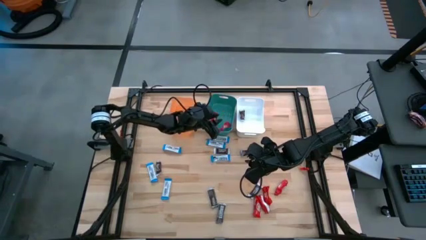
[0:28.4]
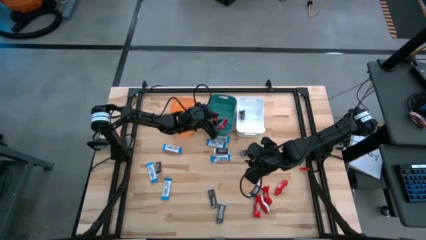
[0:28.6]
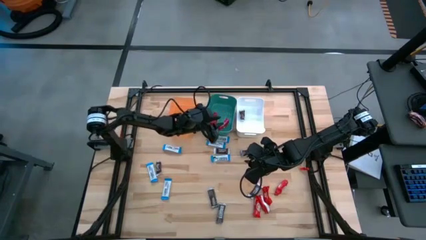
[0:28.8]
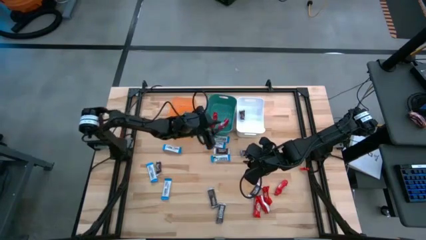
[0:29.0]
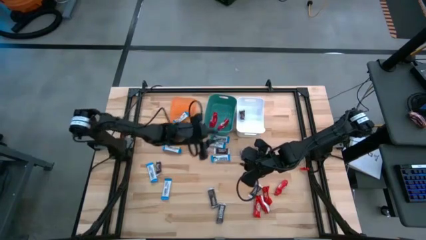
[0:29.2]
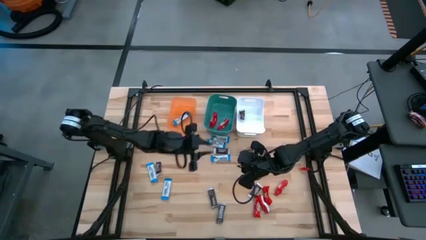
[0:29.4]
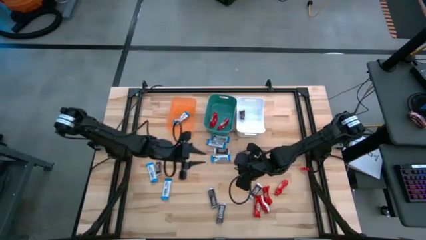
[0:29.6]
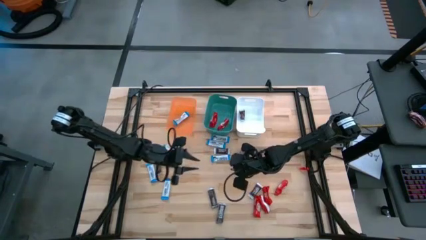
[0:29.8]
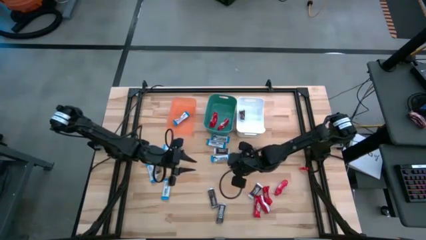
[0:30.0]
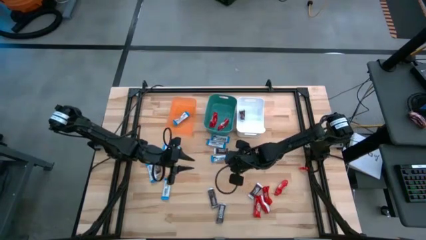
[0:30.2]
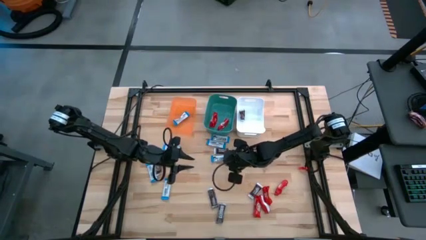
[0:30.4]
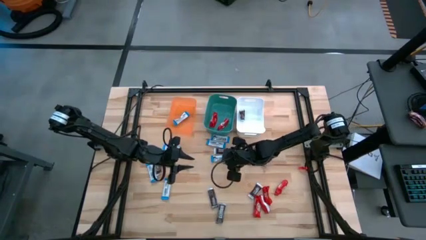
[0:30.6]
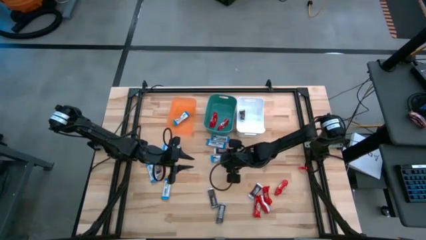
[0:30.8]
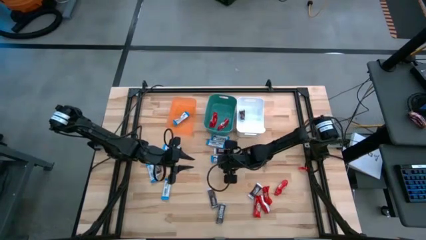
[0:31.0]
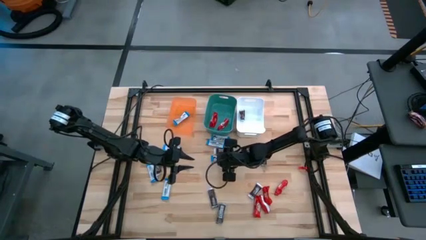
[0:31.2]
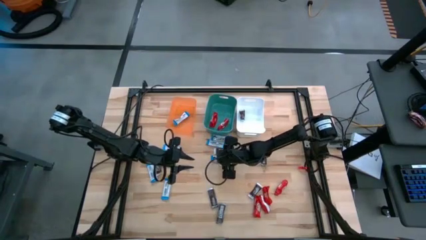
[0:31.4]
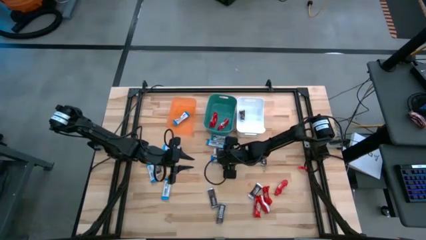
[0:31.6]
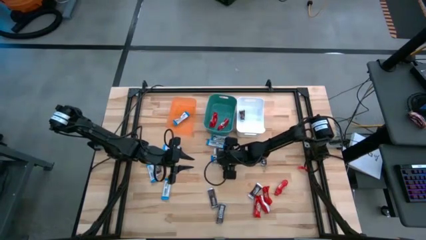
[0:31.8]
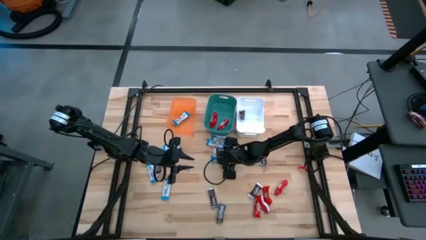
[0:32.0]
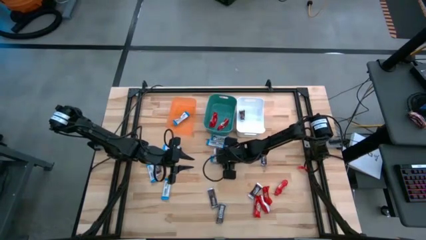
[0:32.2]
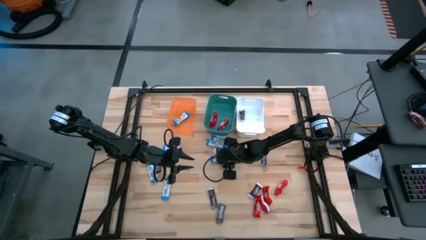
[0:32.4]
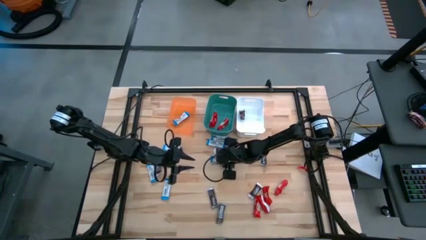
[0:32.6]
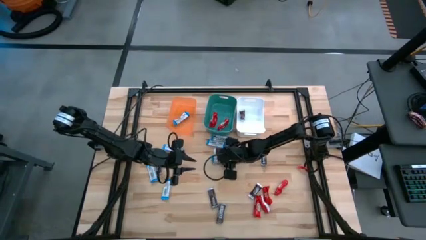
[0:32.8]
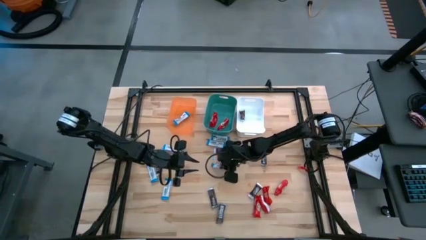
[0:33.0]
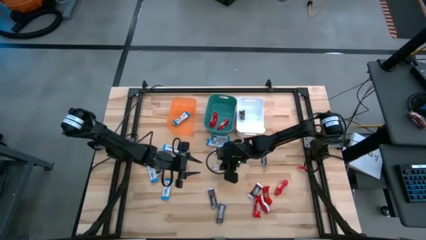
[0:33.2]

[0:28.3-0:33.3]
Task: Organize candy in baskets
Put the white chocolate into the orange bin

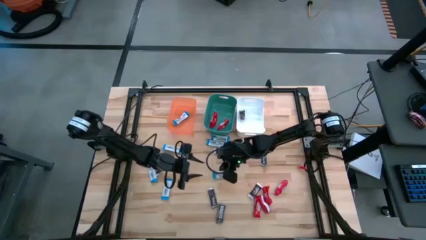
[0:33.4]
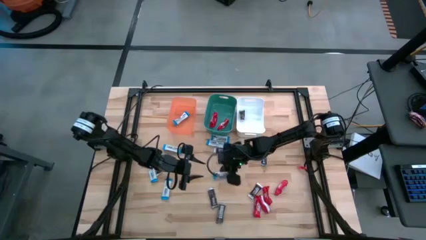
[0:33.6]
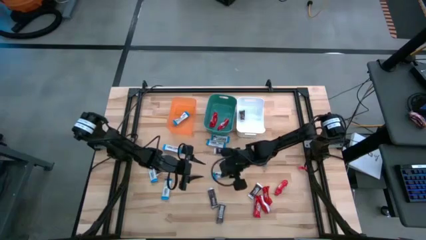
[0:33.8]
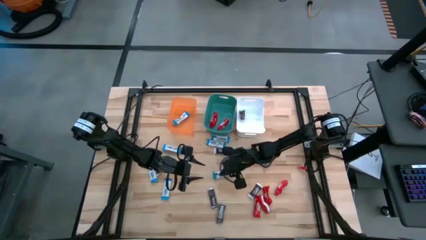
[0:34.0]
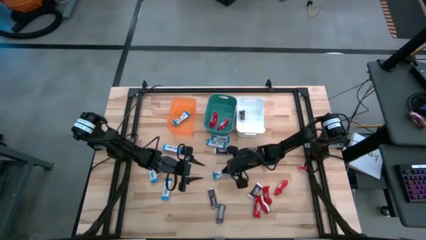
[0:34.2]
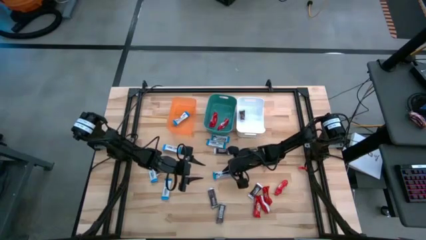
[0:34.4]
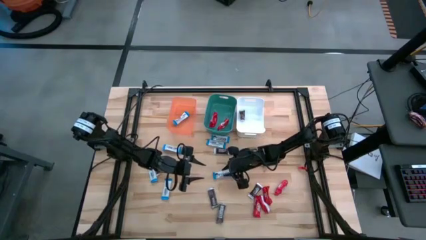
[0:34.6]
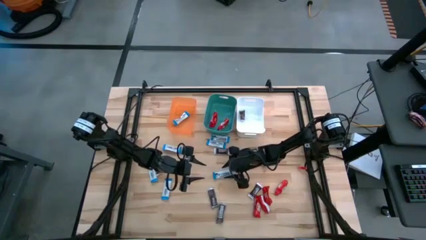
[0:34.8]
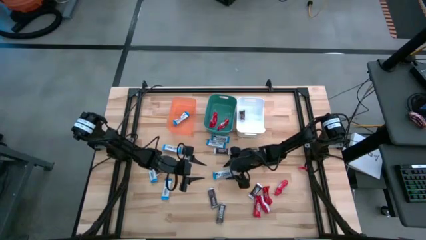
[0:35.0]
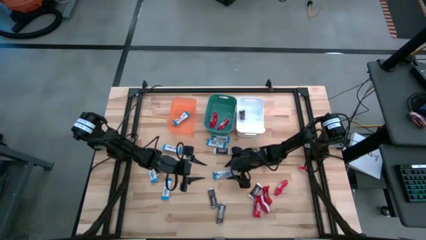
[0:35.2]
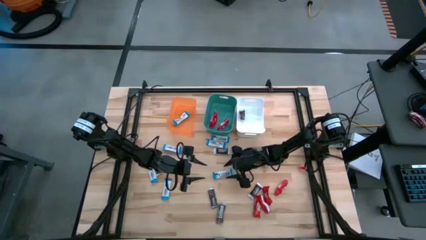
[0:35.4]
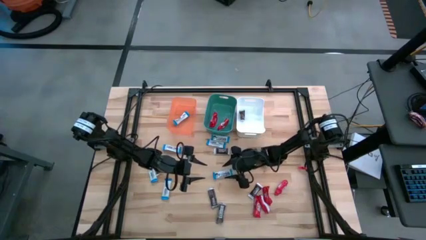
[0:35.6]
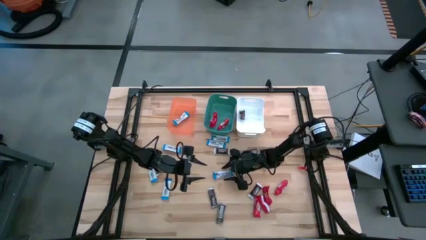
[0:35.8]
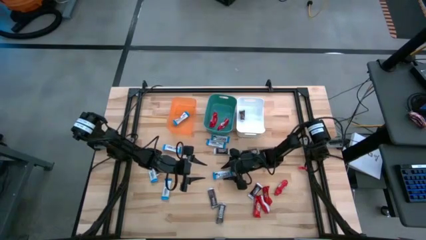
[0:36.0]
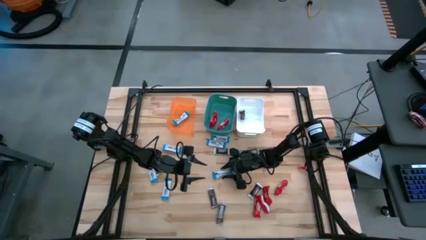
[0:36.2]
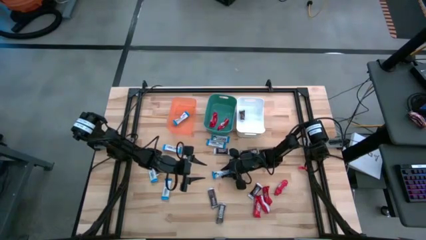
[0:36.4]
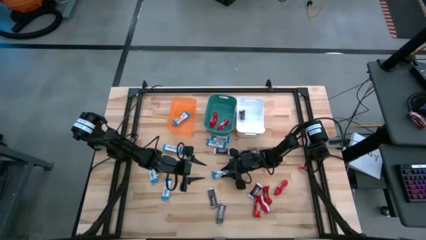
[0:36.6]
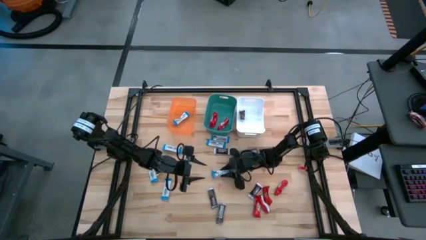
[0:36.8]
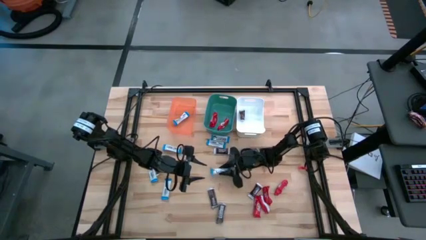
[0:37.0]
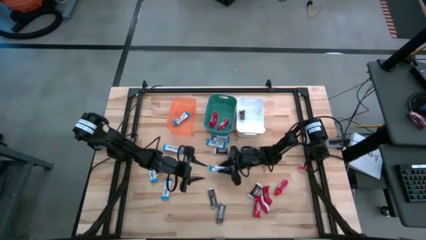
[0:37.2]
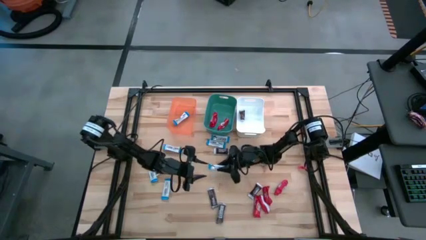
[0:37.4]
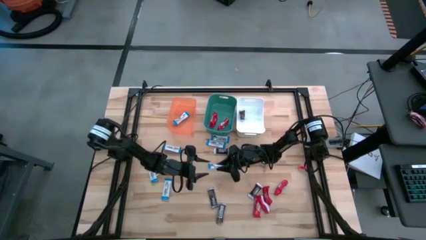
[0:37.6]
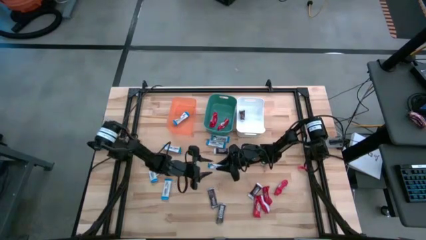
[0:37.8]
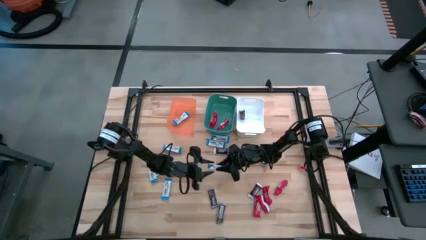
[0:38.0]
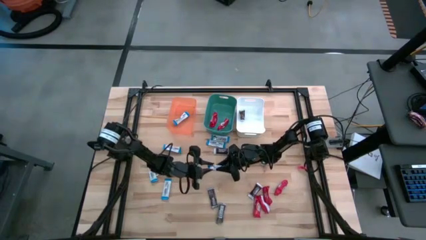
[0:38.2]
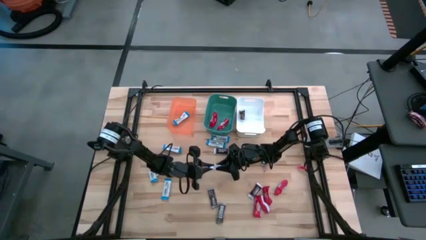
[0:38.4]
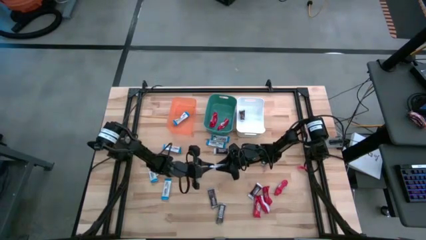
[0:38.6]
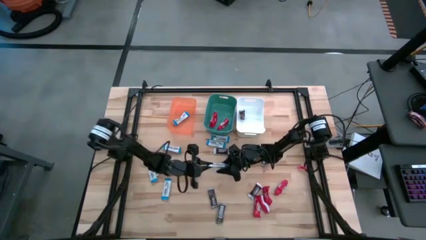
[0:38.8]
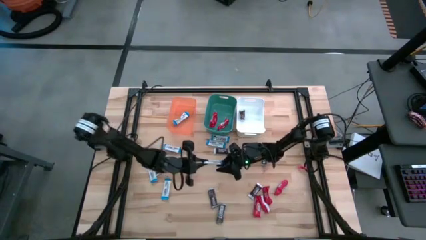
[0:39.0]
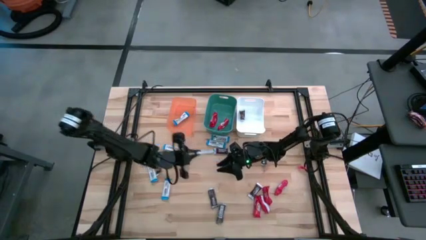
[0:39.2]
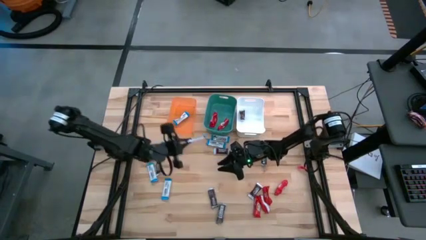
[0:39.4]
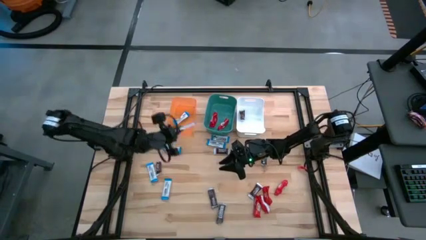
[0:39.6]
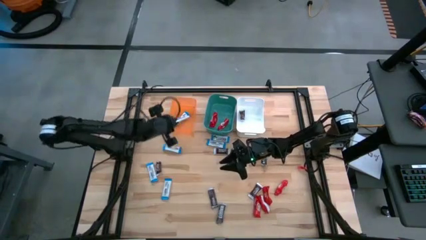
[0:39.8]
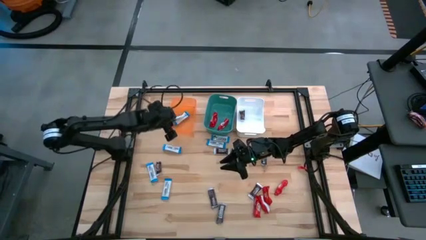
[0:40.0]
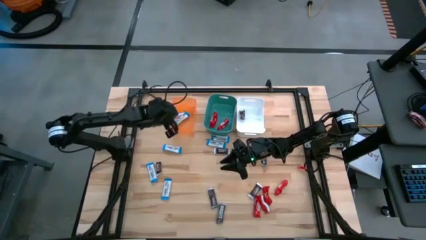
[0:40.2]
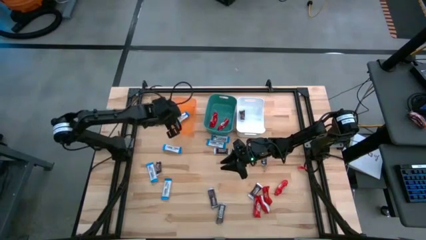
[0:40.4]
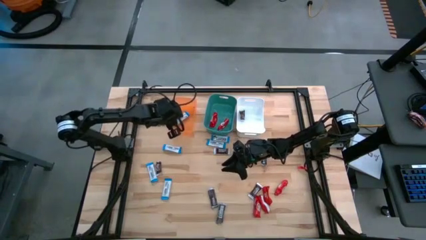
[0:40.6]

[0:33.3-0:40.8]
Put the white chocolate into the orange bin

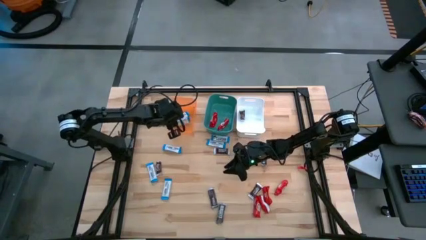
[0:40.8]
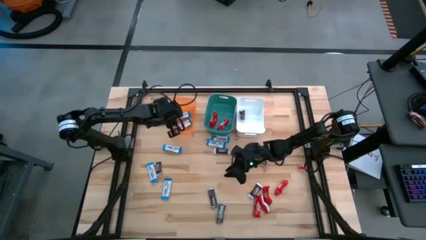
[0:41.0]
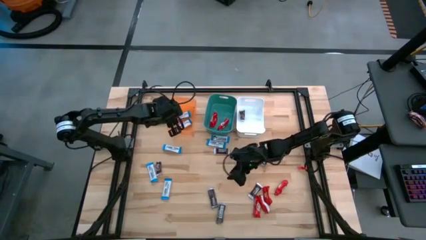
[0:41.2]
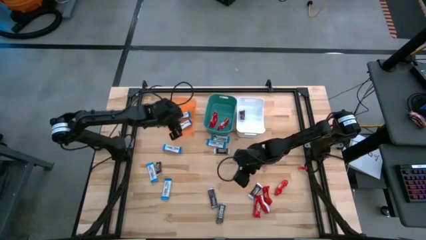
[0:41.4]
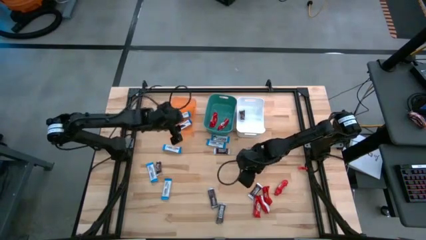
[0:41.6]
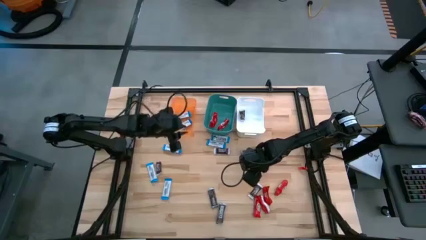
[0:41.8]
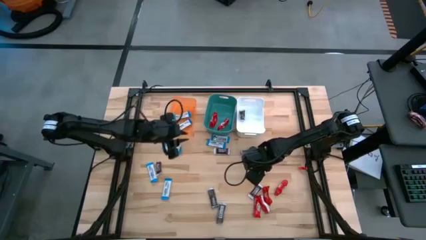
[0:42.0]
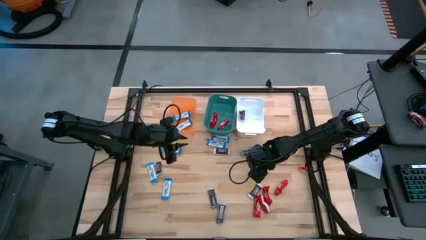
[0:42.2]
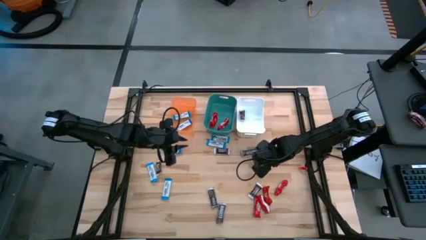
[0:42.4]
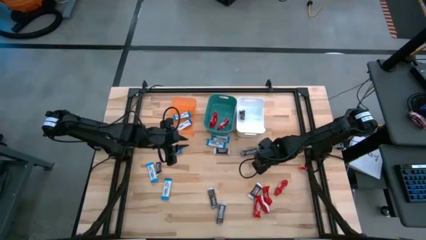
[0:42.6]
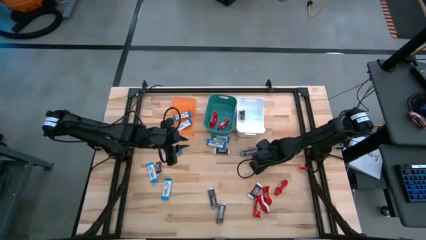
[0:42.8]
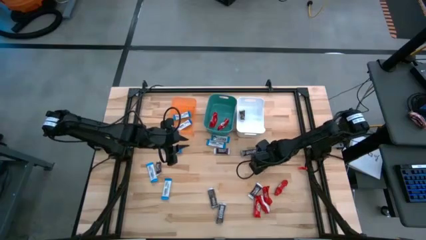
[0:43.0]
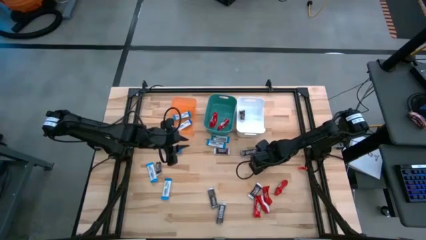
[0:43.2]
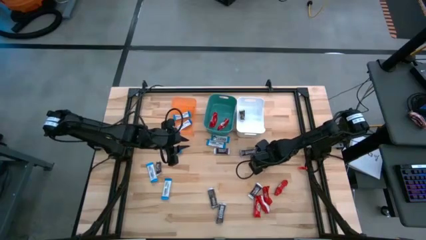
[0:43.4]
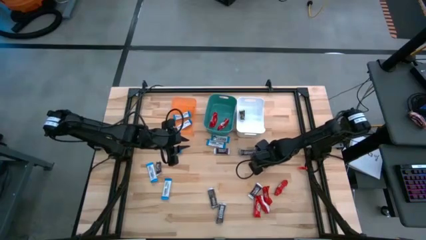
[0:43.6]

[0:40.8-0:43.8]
Put the brown chocolate into the white bin
